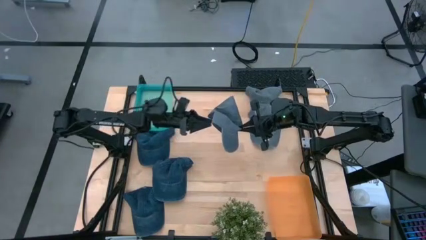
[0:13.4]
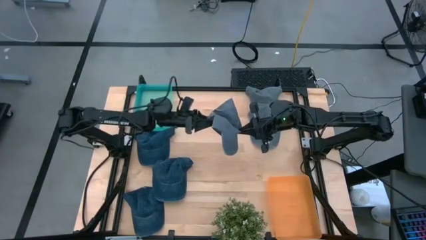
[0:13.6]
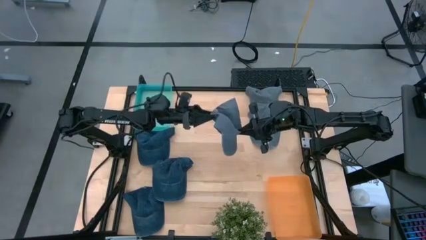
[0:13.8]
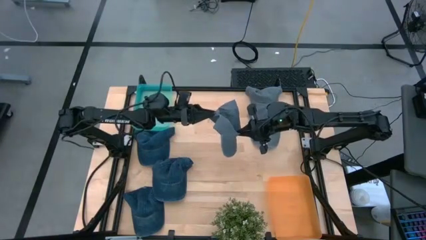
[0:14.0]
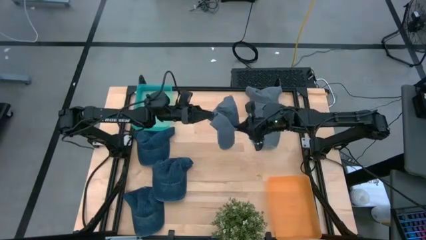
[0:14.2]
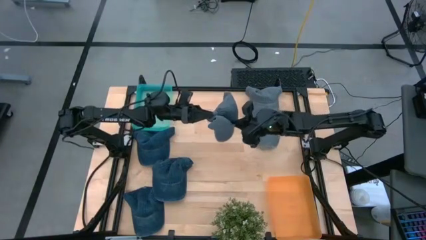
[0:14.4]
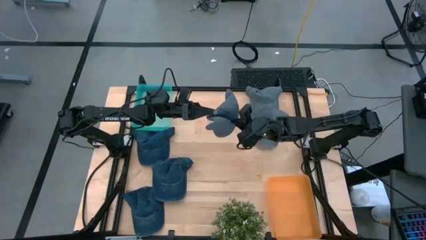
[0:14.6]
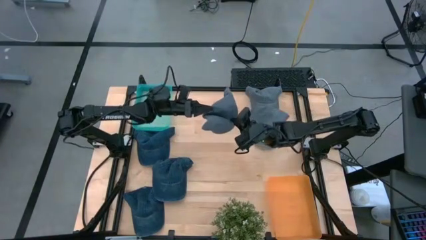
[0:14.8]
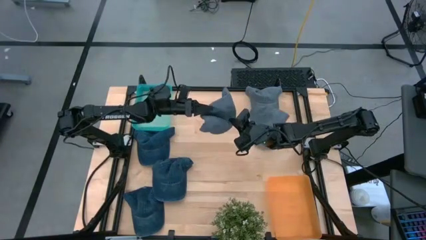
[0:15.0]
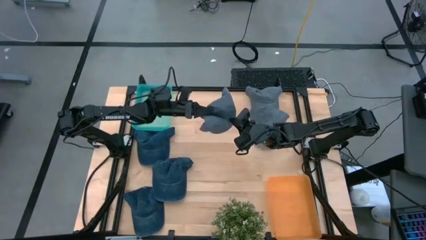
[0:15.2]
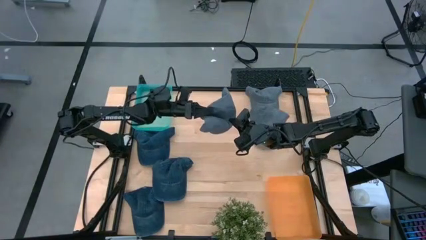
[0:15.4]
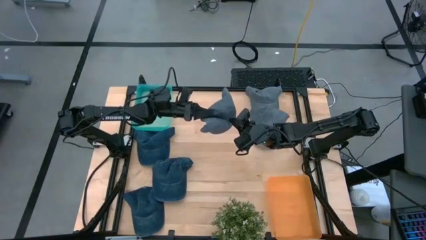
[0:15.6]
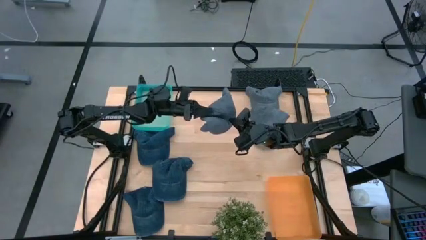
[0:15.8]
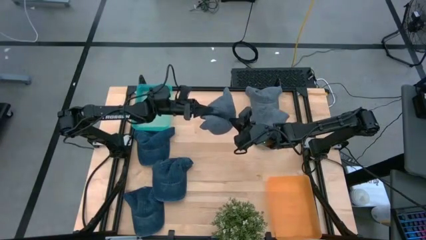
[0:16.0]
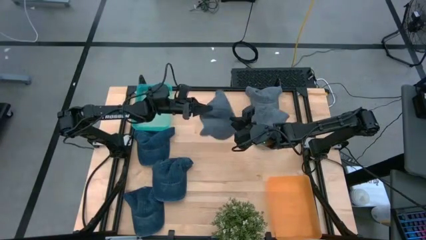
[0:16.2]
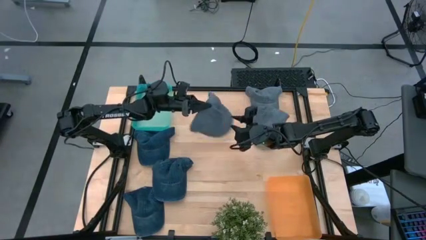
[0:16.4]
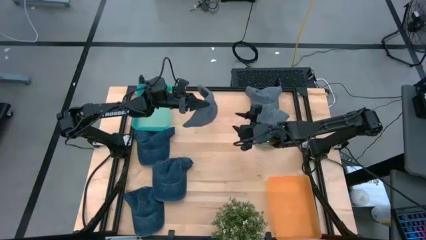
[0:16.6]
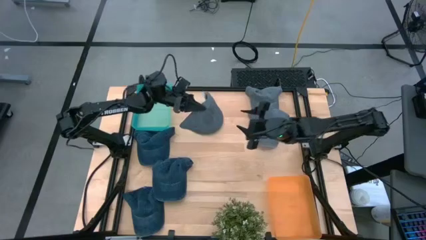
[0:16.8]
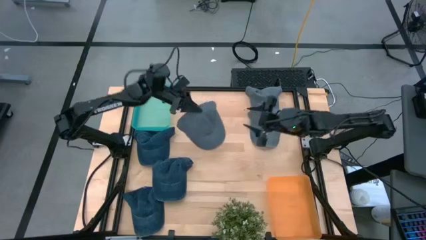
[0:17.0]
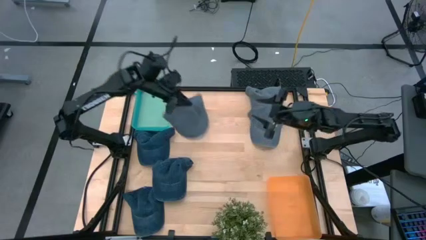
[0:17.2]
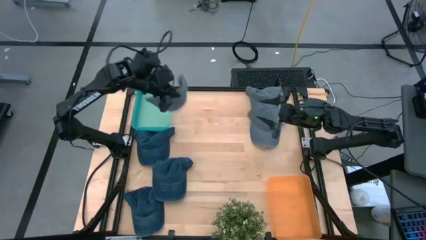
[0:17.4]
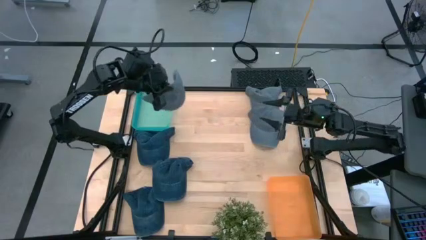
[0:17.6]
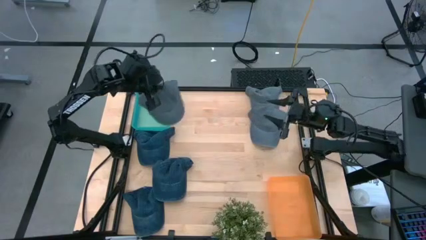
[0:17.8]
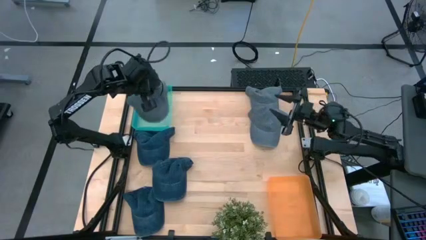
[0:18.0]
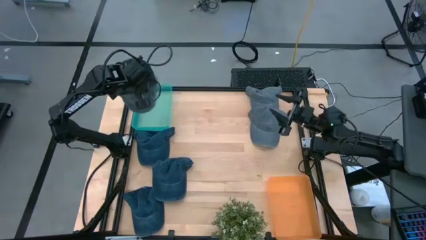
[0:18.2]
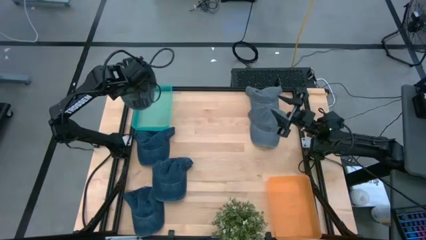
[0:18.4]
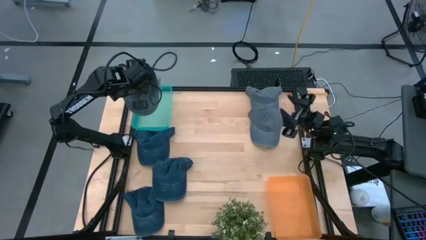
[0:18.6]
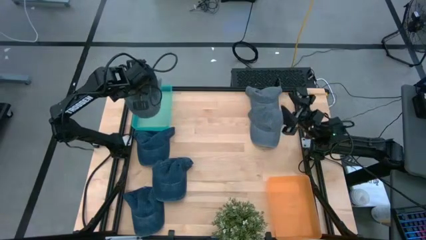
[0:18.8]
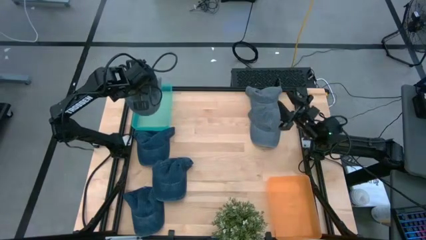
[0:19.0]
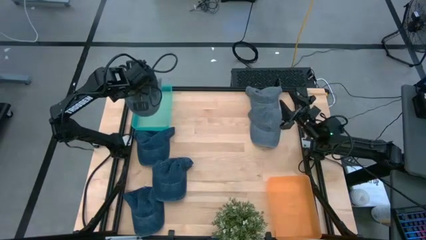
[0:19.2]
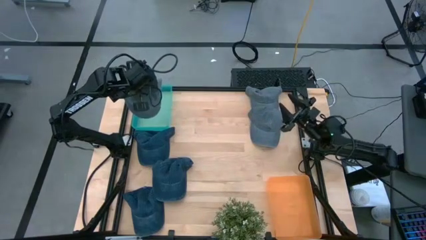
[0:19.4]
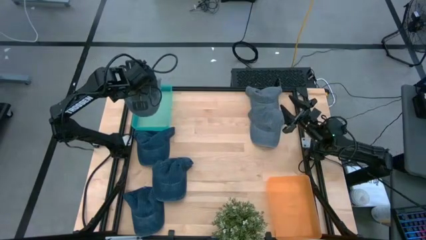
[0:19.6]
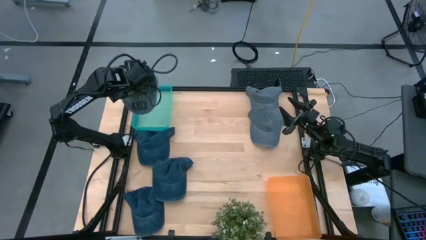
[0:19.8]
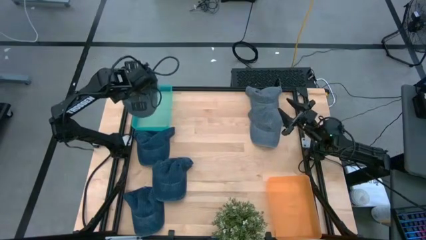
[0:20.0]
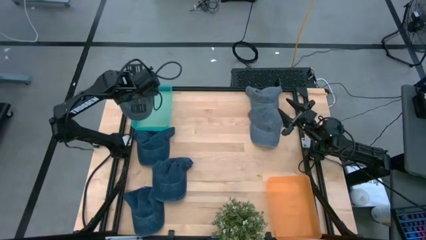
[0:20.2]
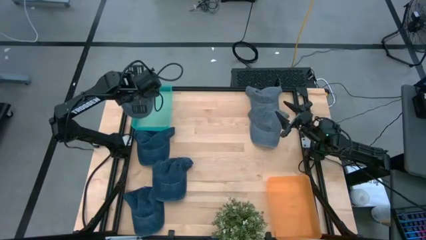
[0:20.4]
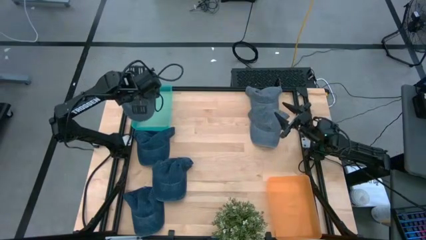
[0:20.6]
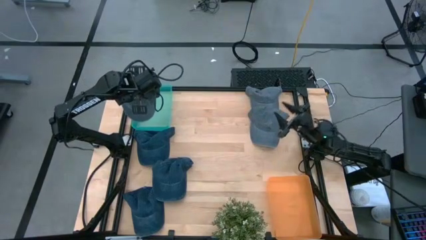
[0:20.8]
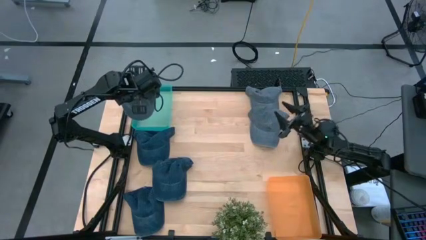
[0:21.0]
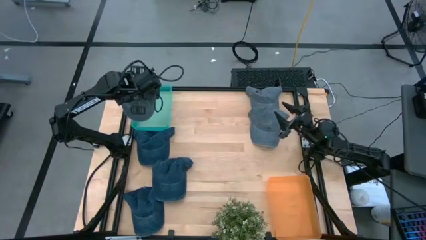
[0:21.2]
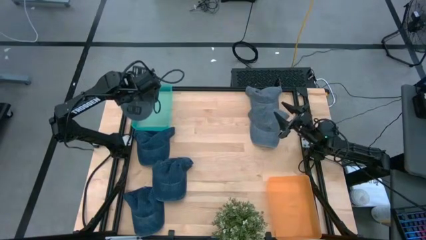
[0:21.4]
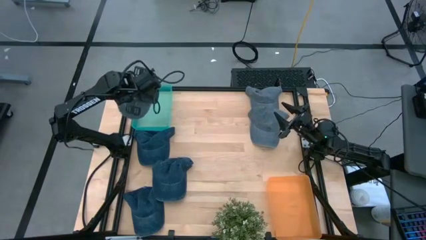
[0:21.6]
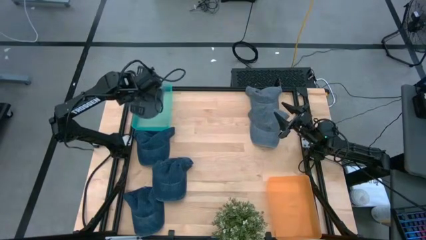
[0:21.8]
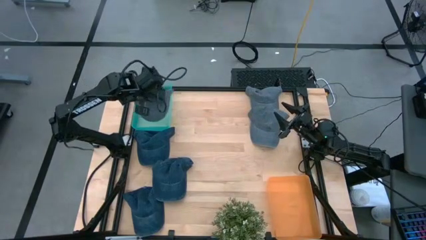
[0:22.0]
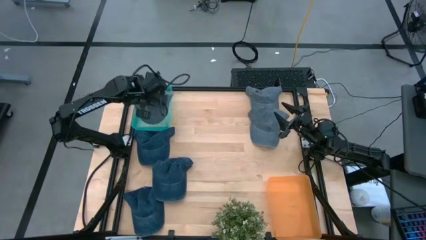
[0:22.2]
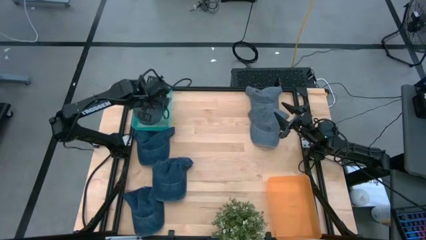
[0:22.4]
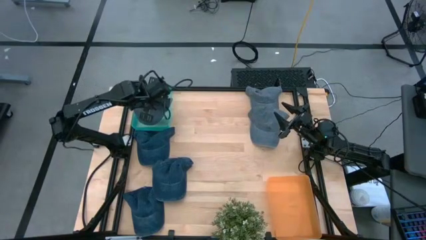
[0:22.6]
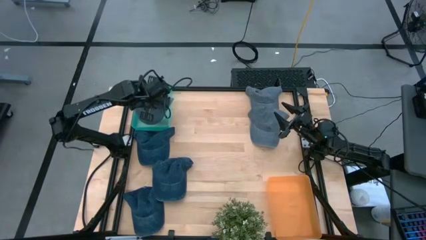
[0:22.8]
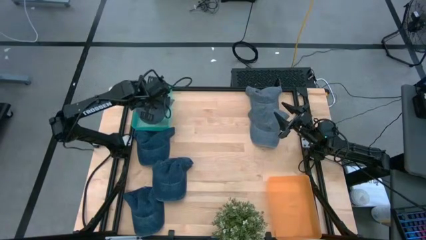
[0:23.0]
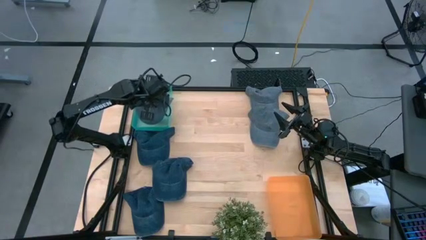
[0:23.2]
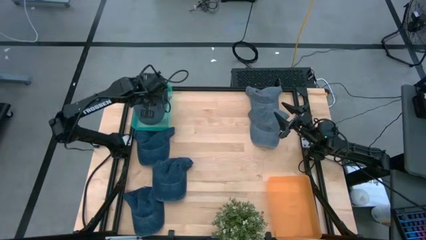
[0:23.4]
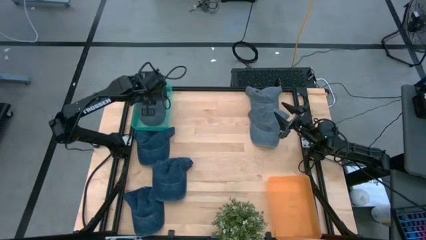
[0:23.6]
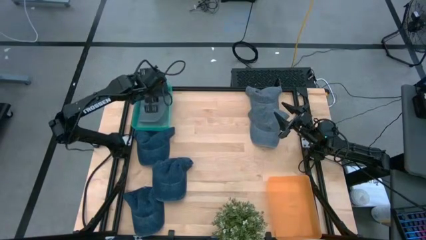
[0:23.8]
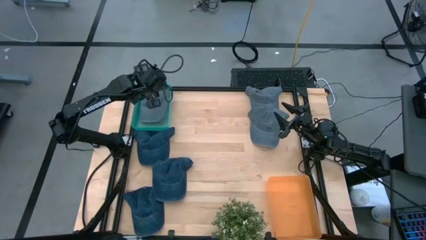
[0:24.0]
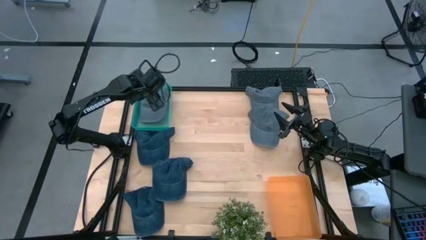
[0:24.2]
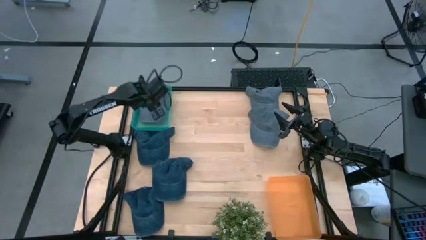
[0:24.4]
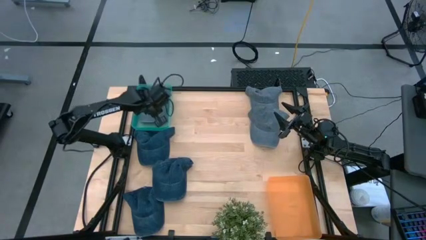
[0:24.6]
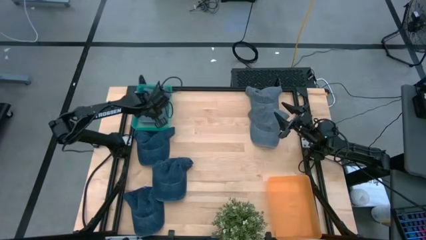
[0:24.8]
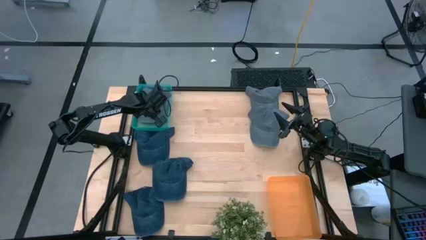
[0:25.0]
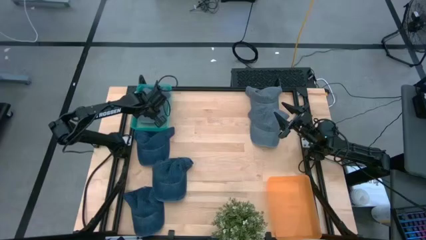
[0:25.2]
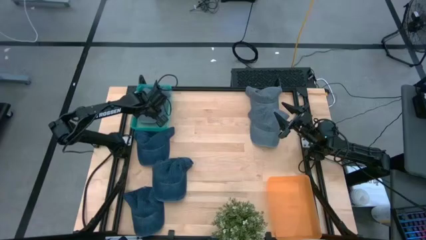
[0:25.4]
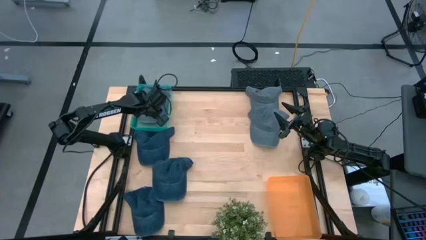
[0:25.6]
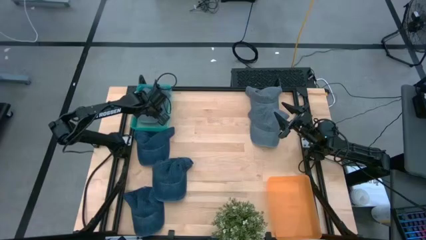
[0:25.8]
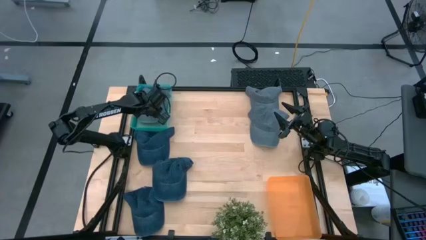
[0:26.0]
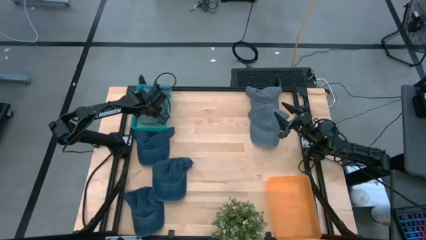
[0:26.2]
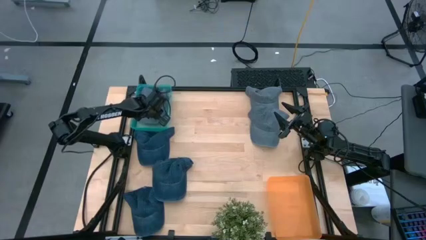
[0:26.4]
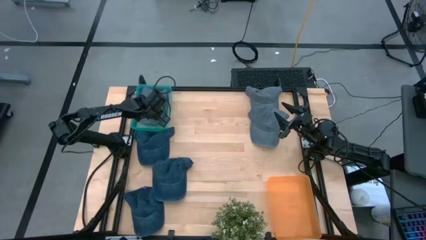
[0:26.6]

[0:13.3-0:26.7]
Task: Pick & Place hat
Put the bottom gray cap into the green bin
